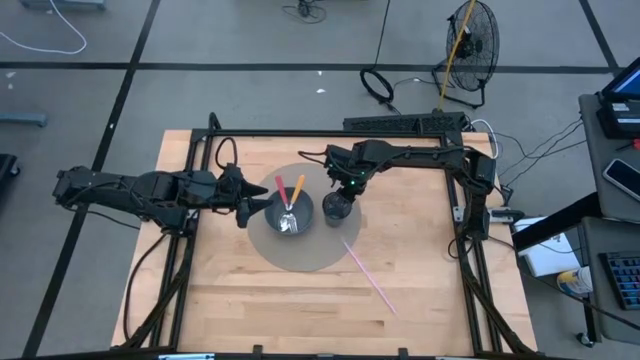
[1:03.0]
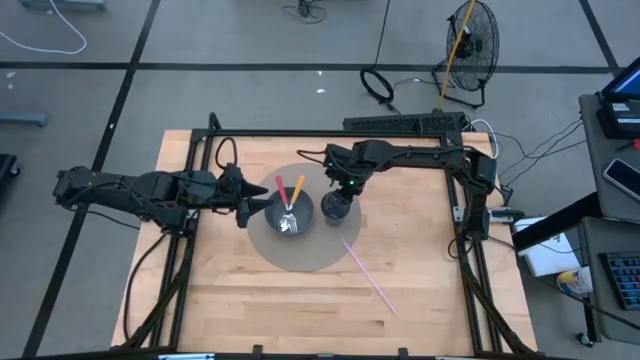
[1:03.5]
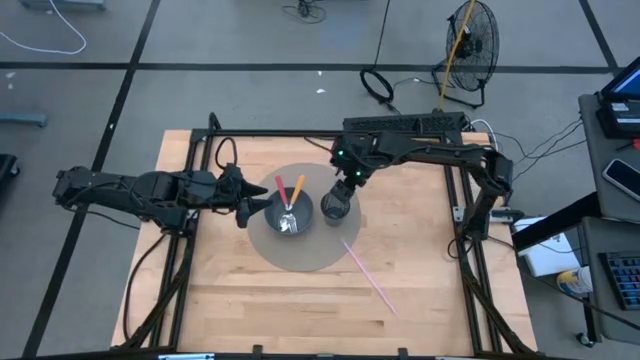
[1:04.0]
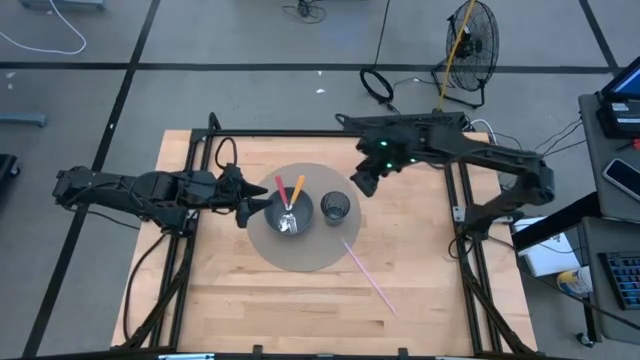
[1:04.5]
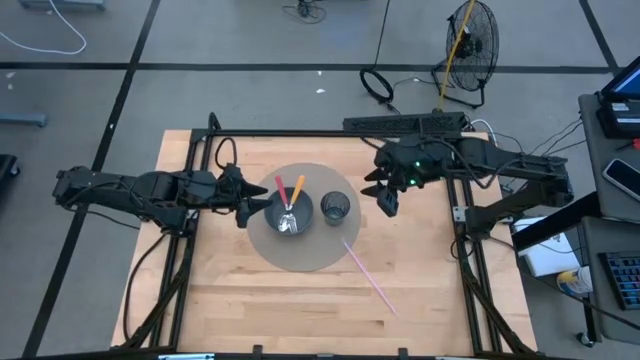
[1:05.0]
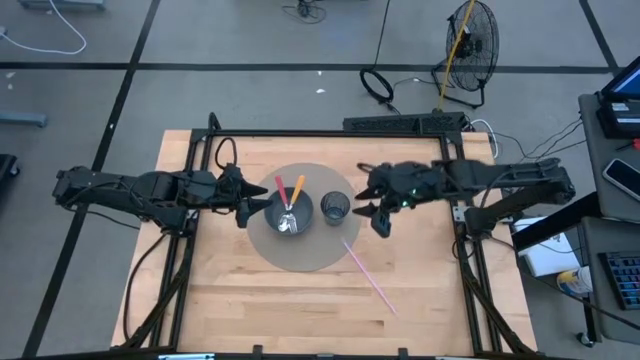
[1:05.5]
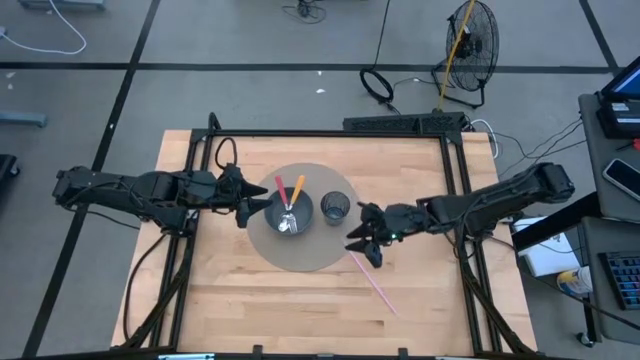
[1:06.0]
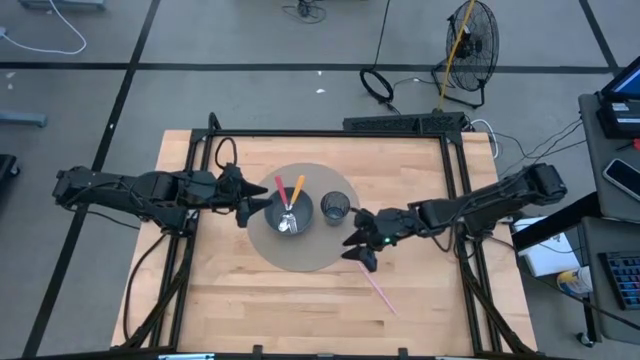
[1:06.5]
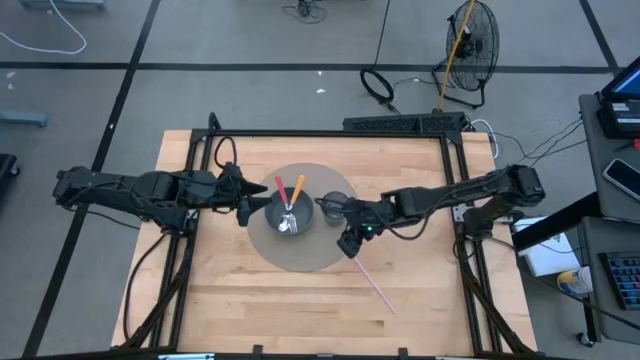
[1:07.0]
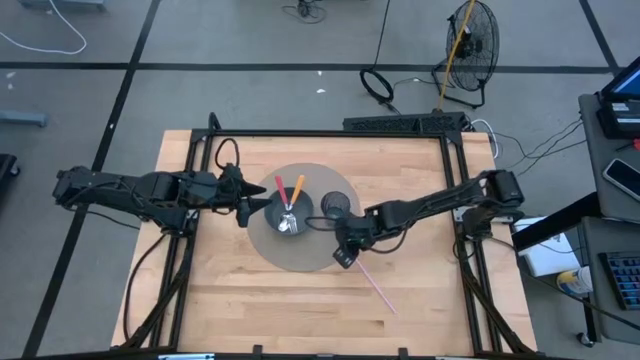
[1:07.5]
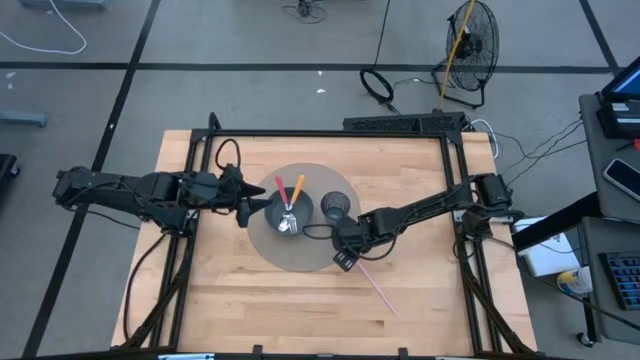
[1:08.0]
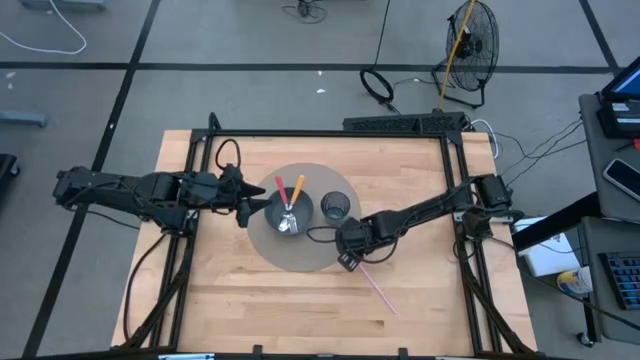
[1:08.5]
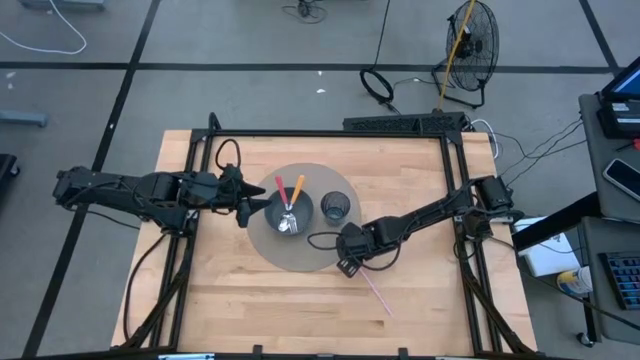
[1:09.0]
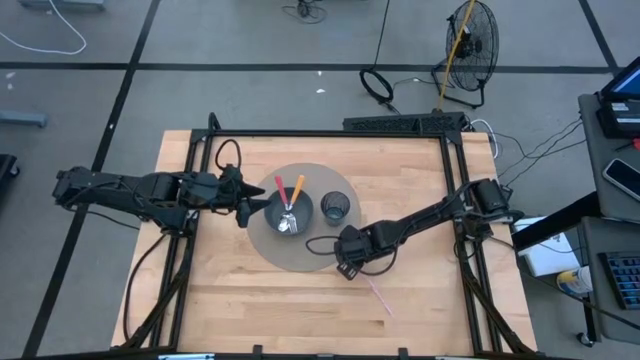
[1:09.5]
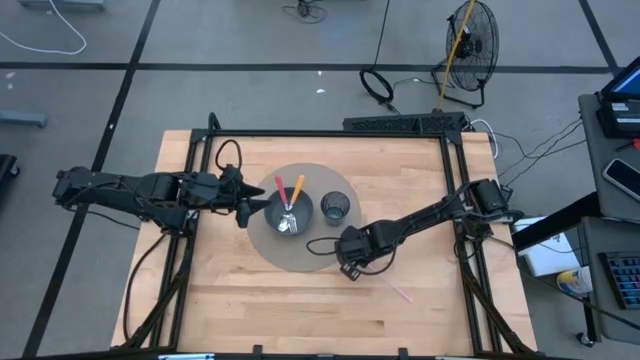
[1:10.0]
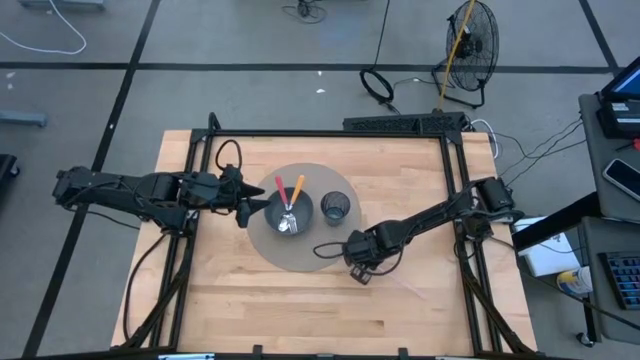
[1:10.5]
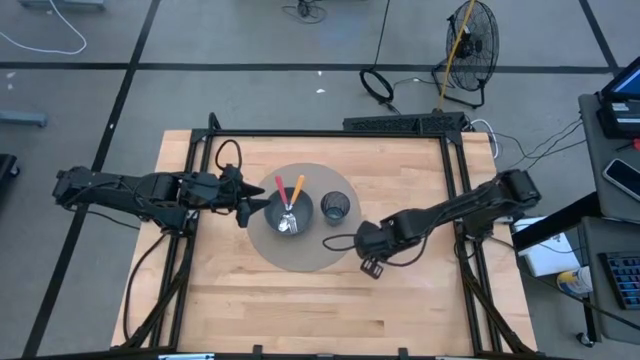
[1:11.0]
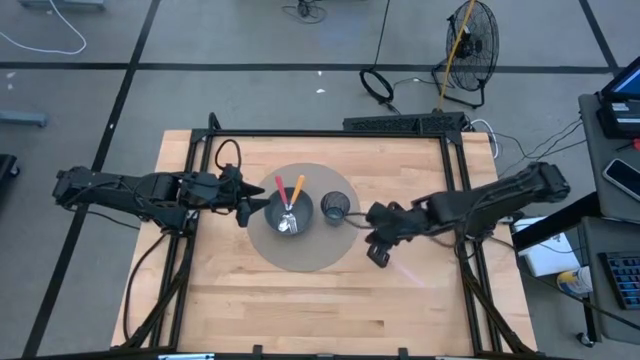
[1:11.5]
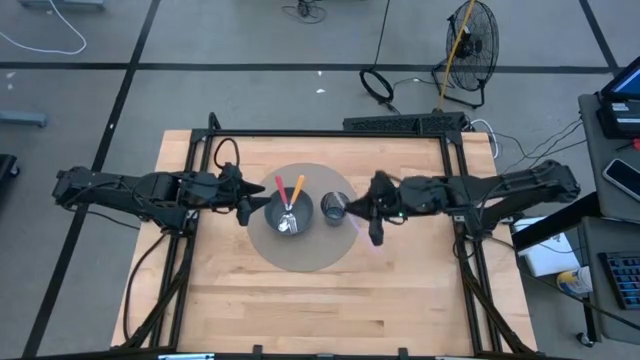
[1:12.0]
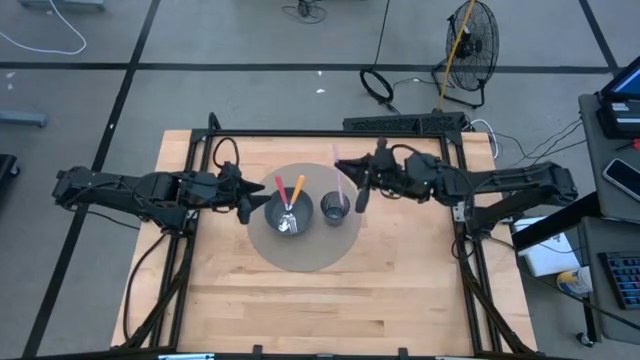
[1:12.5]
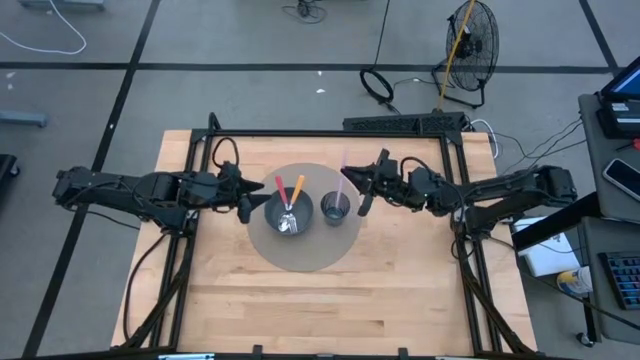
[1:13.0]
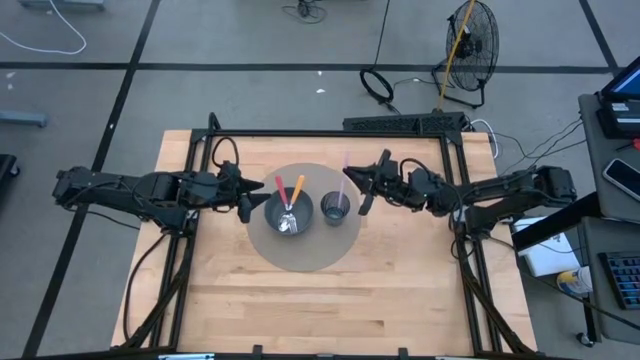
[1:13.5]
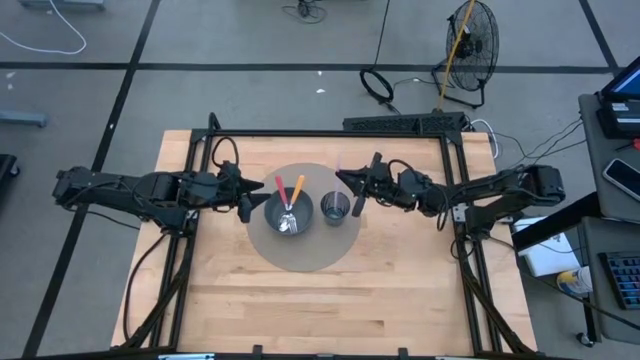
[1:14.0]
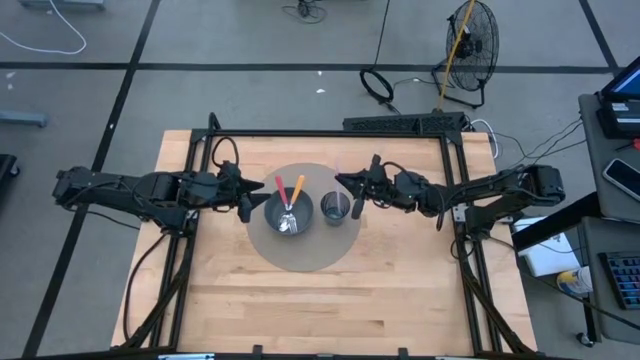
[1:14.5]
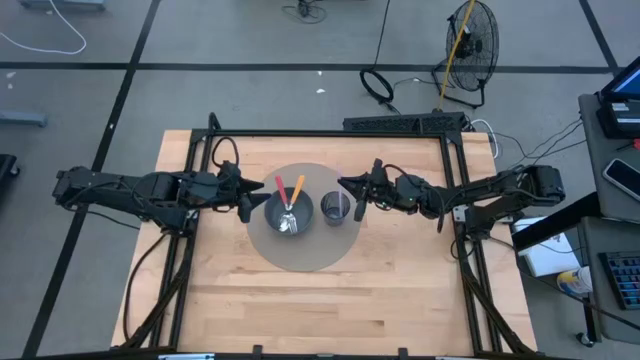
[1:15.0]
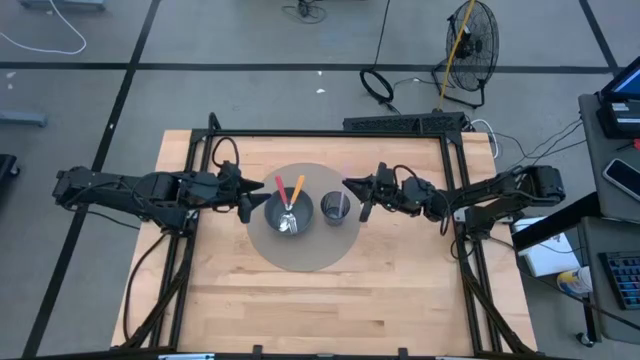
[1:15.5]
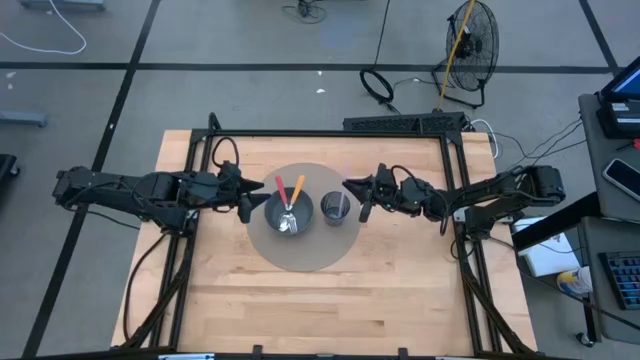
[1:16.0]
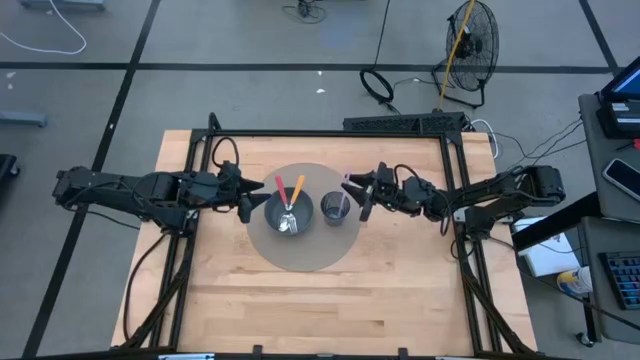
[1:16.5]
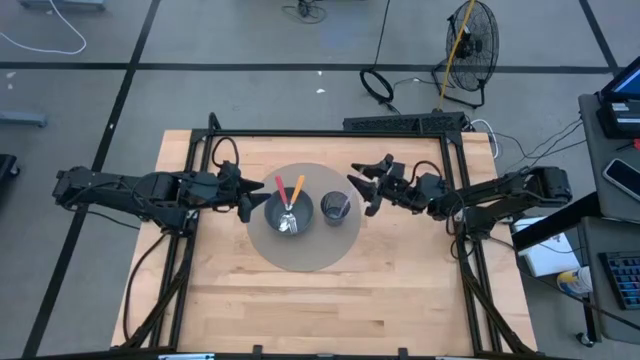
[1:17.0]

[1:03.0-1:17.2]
Task: Pick & Place Utensil
Put the pink straw into the blue cup

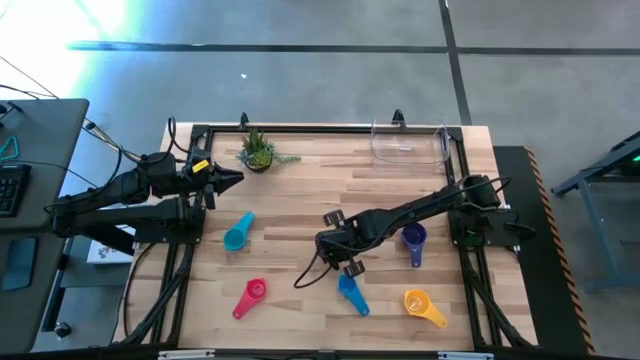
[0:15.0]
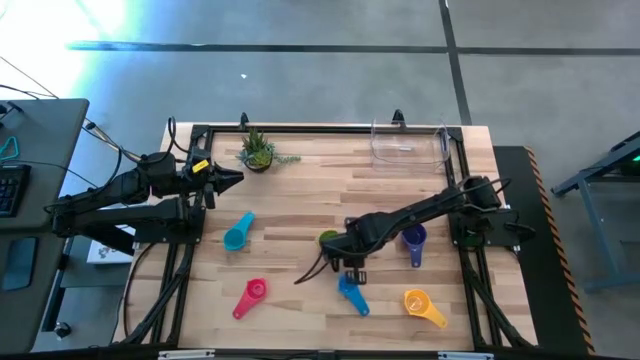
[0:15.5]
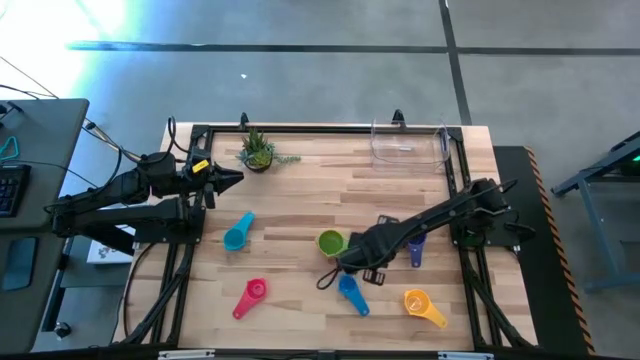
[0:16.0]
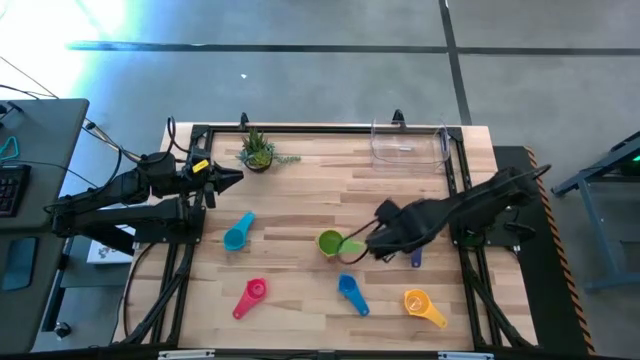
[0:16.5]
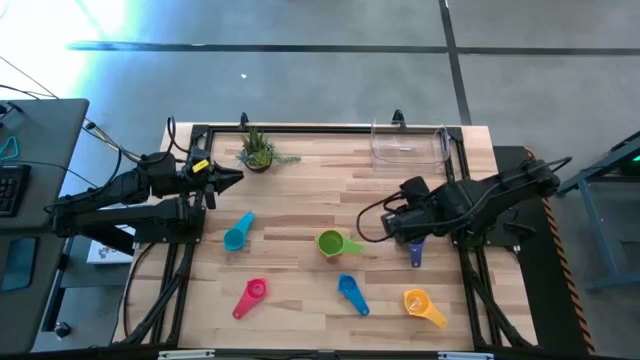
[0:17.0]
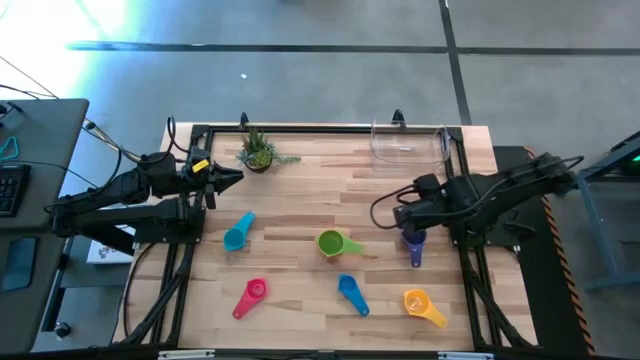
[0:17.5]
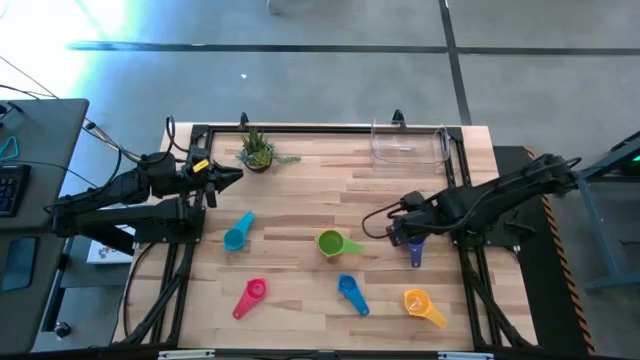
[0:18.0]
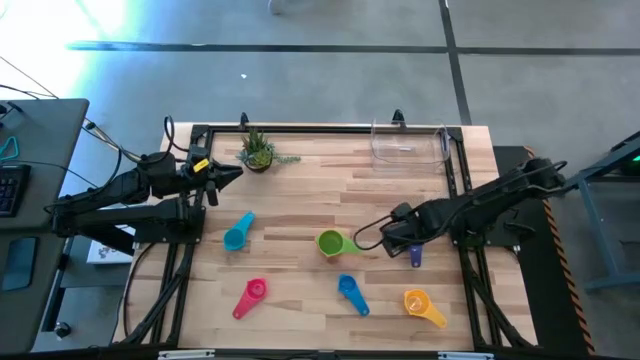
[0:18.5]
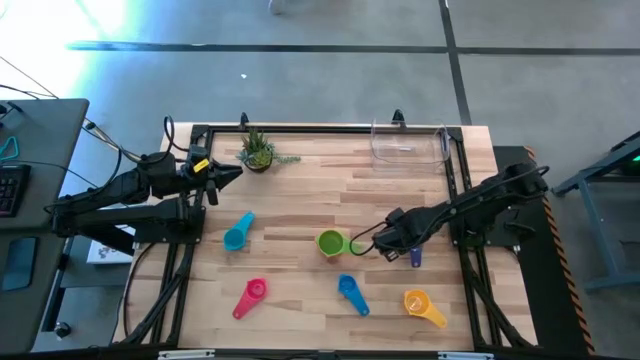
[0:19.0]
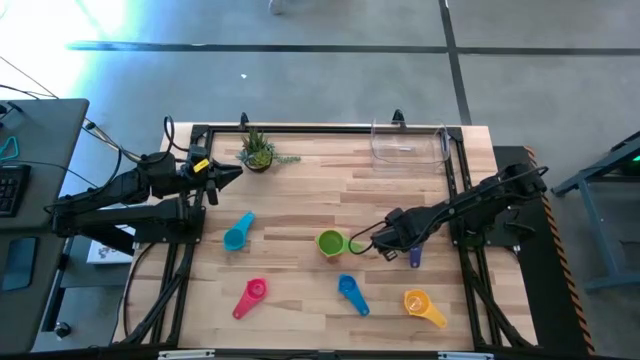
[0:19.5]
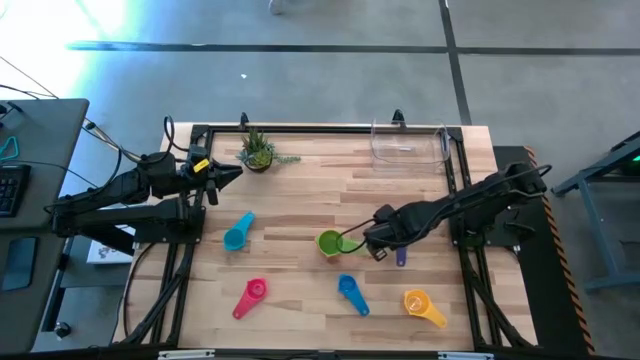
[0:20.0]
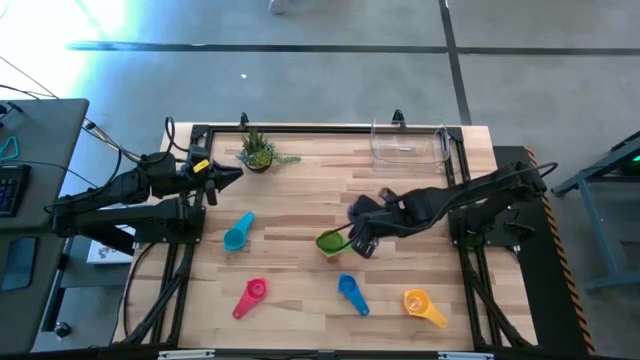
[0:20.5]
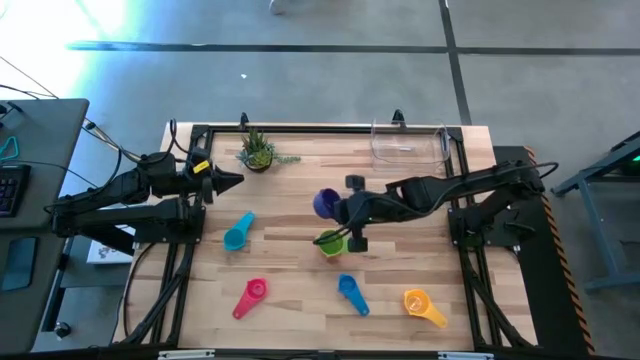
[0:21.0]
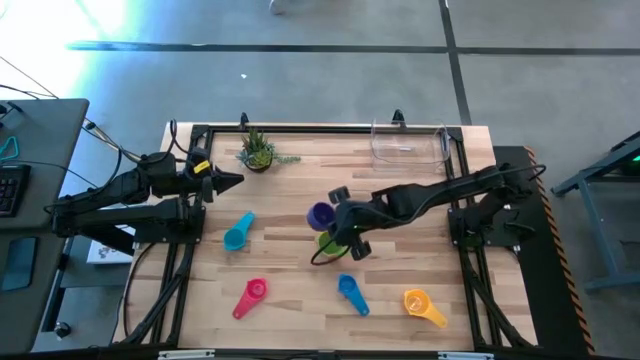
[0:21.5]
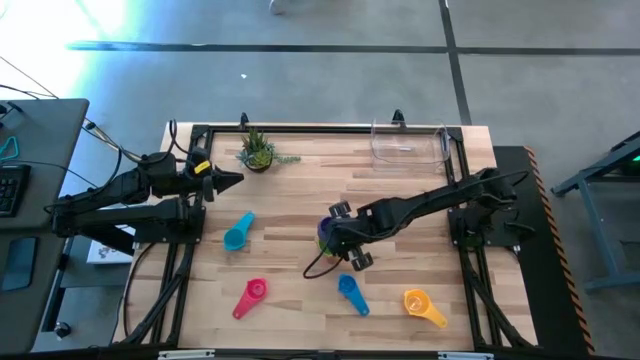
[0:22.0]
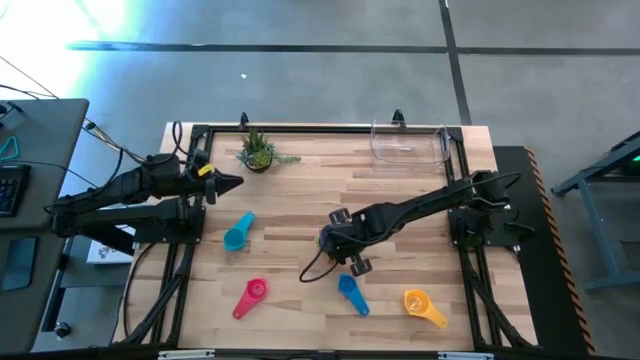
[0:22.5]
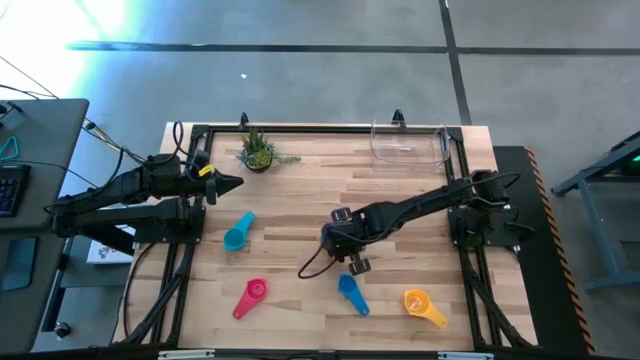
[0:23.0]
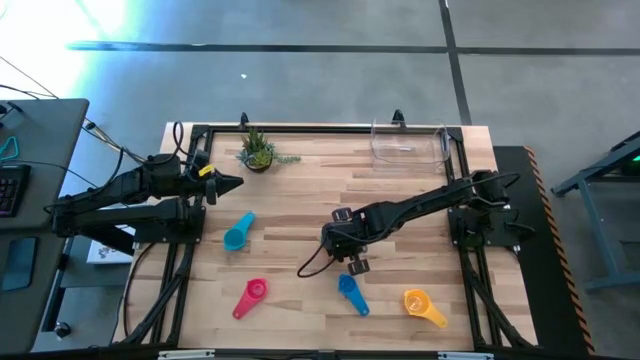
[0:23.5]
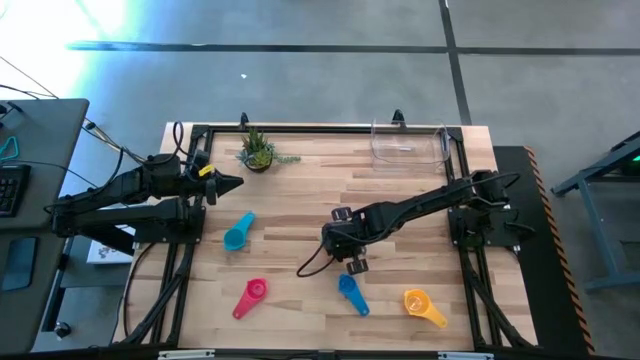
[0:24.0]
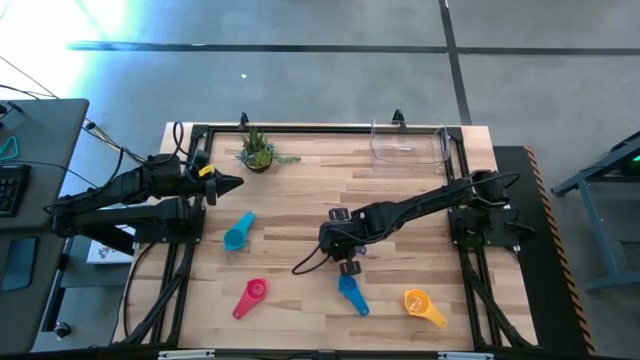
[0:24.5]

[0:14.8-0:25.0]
Task: Nest measuring cups in basket
Stack the dark blue measuring cup on top of the light green measuring cup
